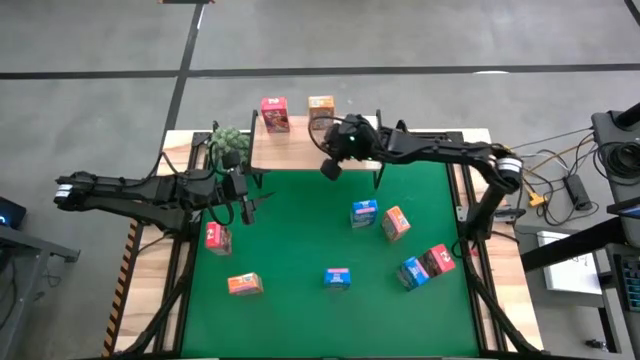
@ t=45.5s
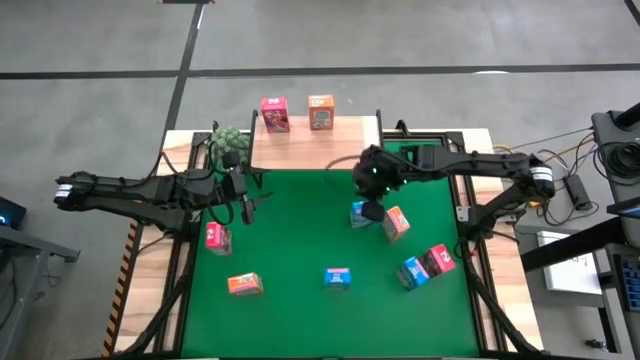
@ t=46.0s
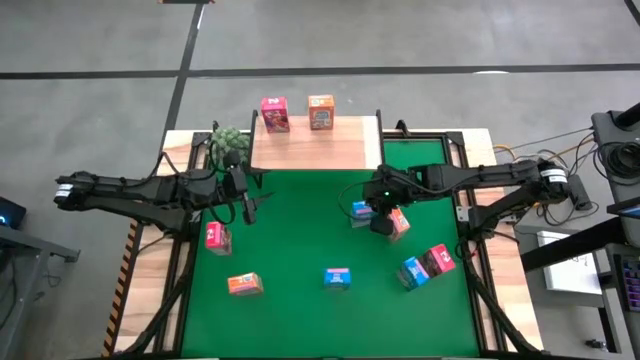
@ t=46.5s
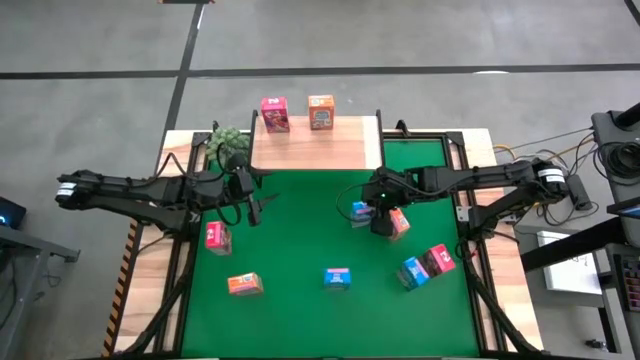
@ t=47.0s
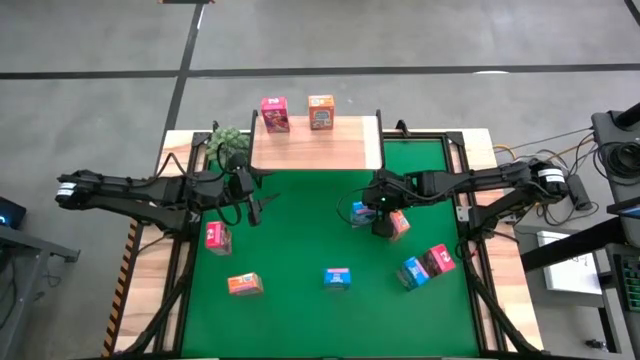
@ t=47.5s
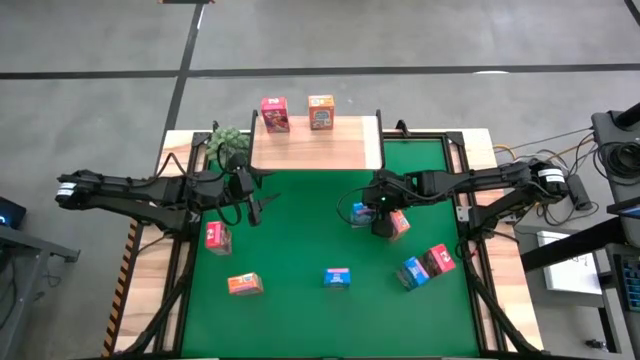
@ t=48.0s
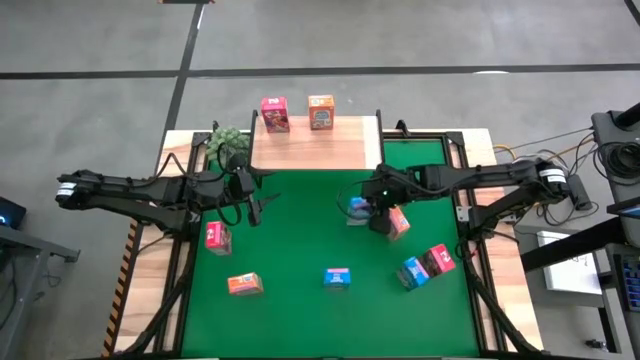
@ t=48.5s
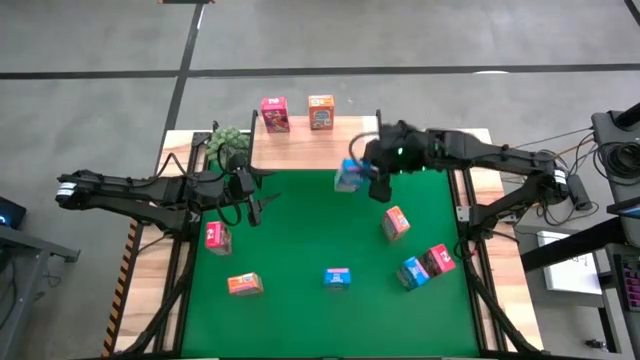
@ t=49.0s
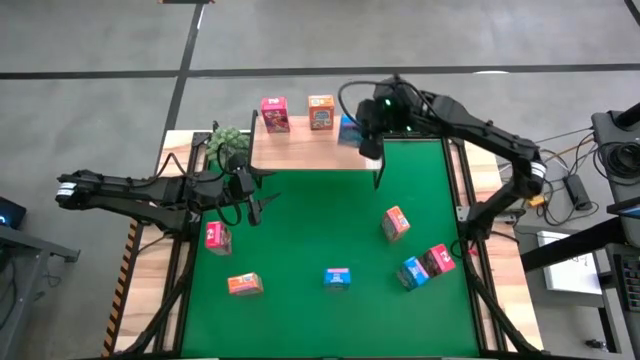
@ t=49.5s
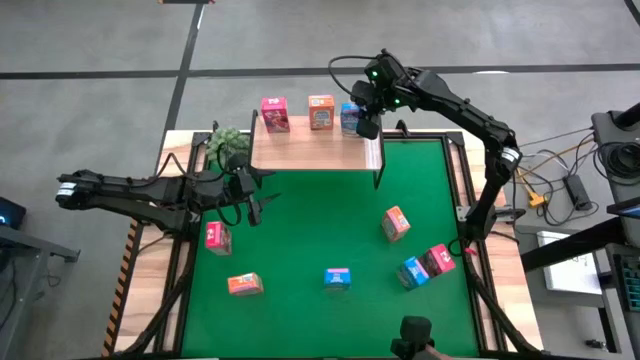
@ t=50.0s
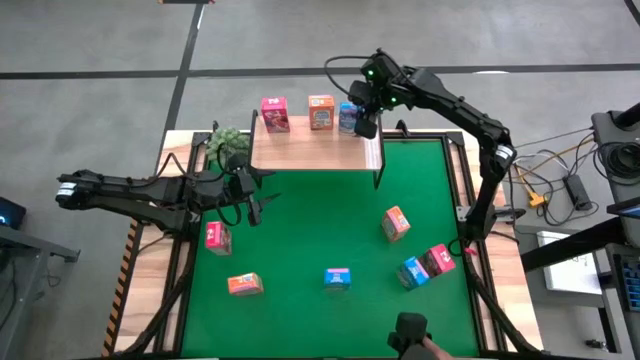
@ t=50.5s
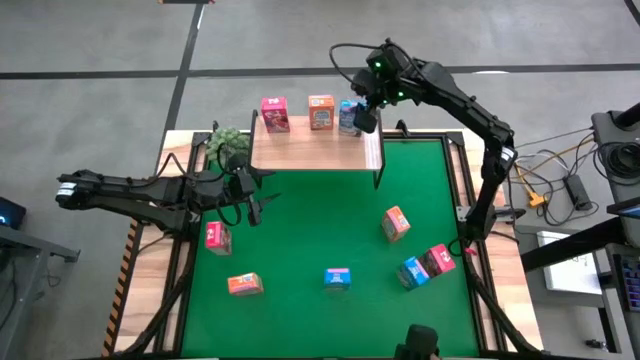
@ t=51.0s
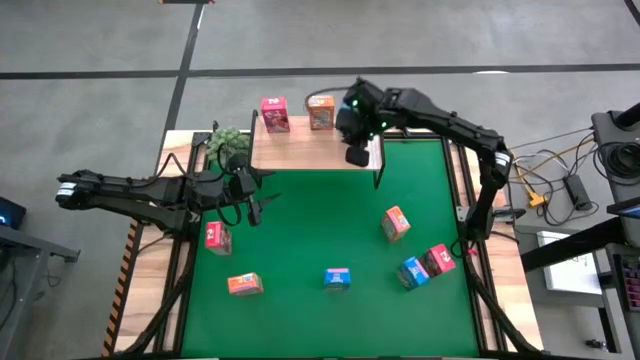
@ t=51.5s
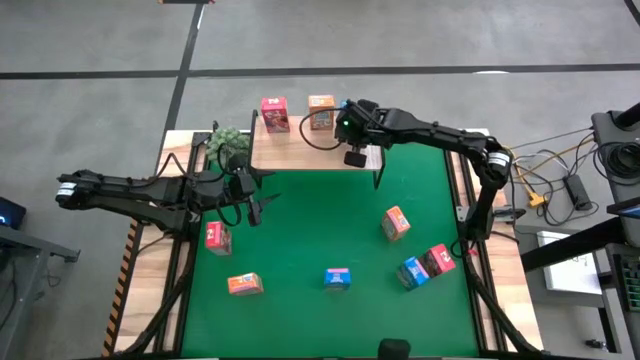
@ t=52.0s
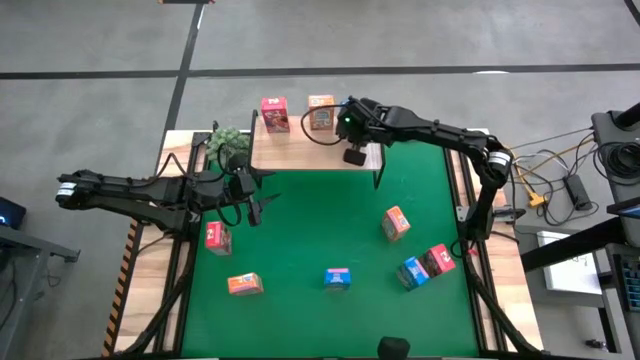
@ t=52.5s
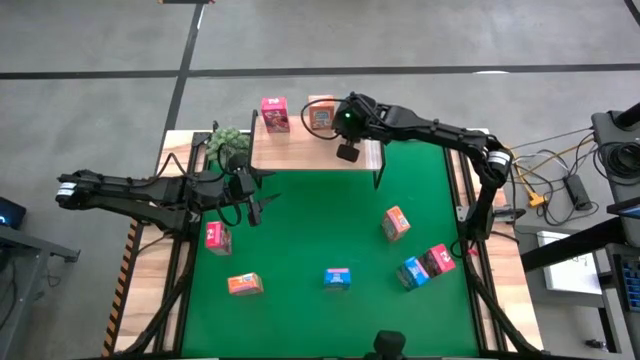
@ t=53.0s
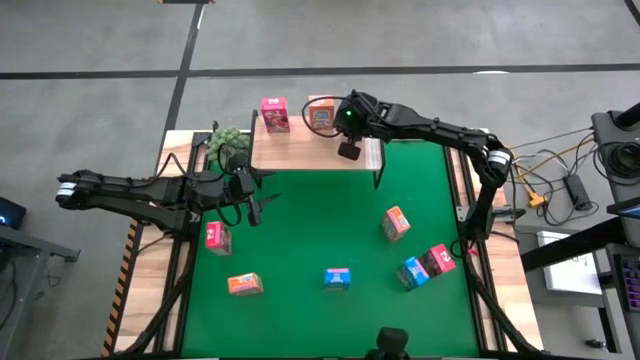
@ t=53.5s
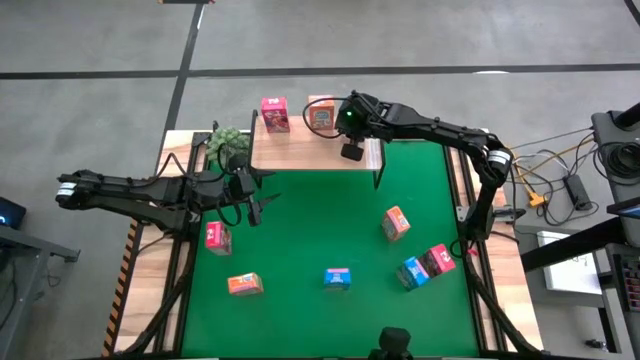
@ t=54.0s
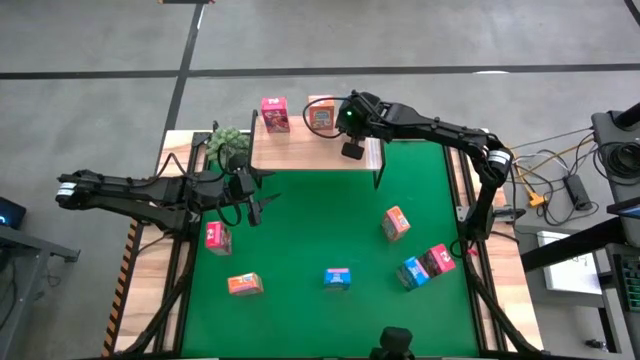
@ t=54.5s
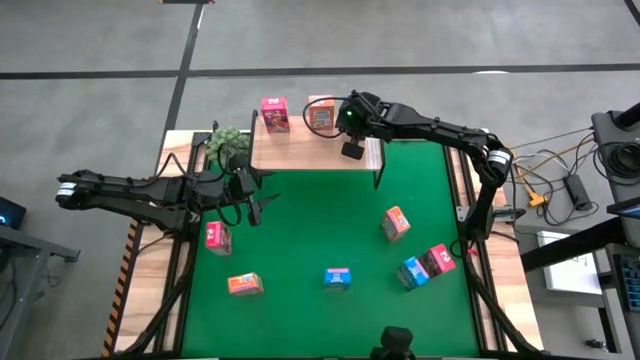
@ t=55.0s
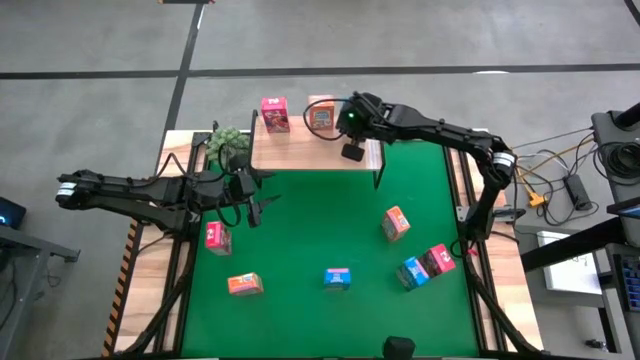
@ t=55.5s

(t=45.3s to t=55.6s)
Task: Stack cereal on shelf
Put the top middle blue cereal box on the shelf

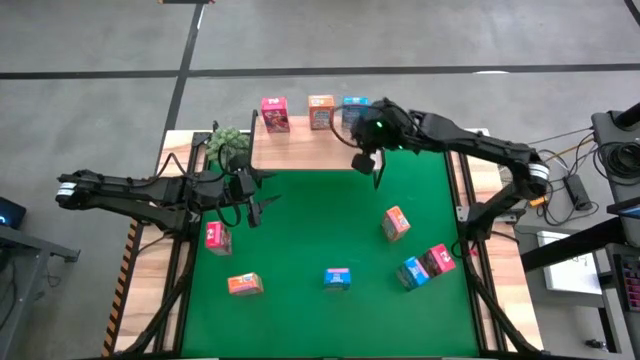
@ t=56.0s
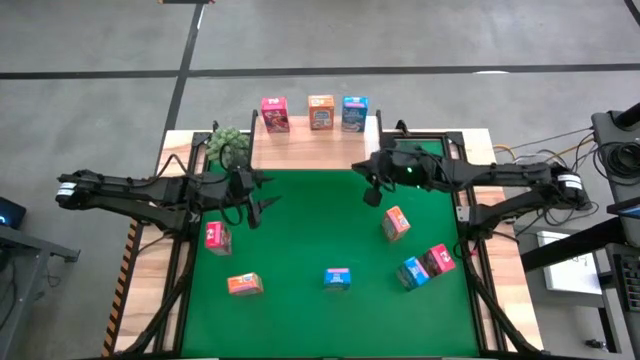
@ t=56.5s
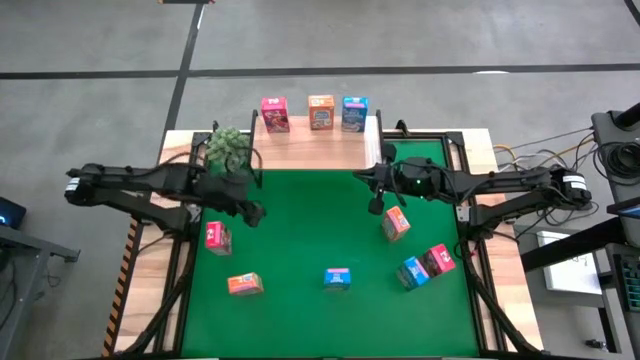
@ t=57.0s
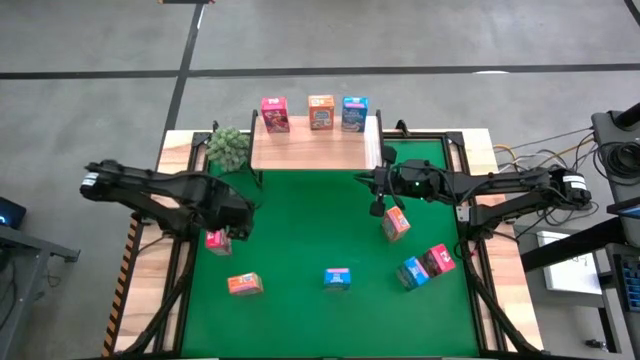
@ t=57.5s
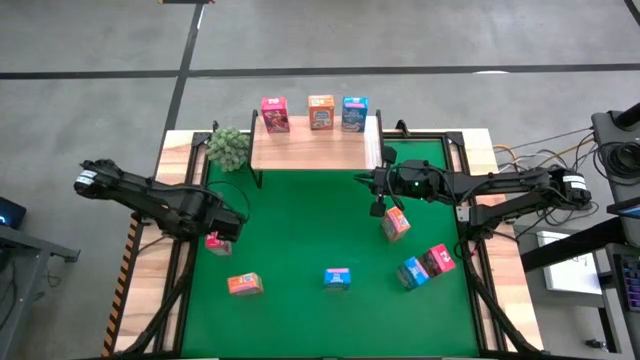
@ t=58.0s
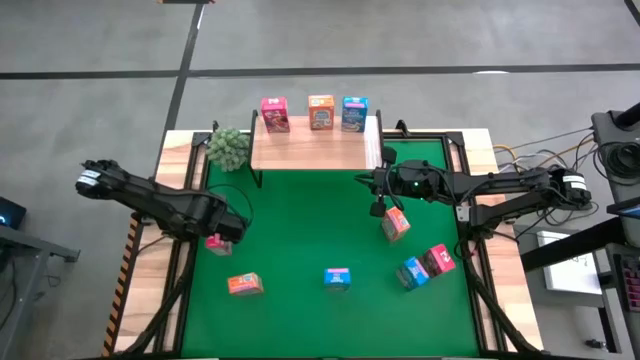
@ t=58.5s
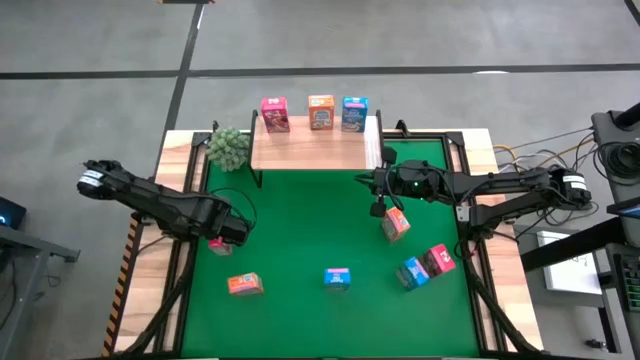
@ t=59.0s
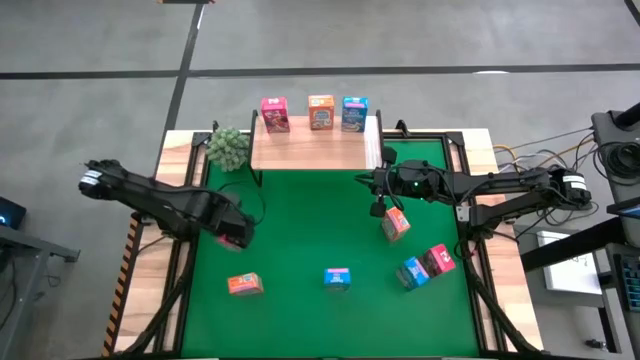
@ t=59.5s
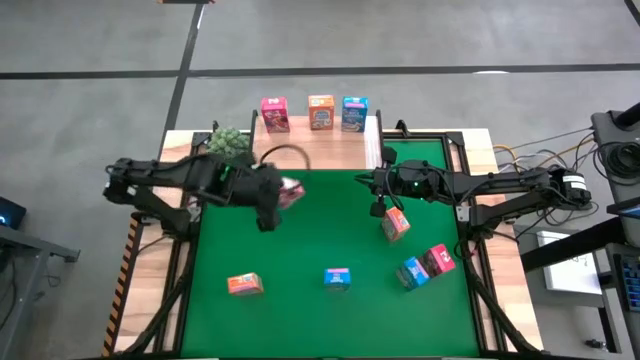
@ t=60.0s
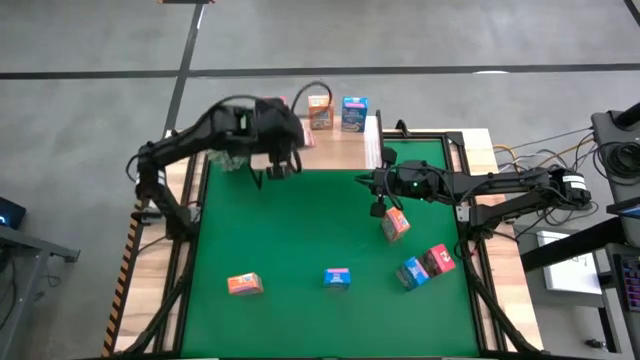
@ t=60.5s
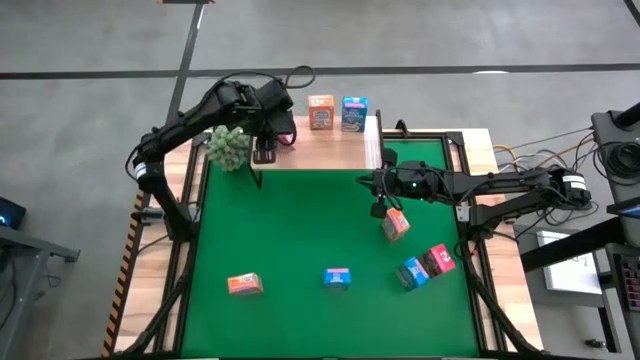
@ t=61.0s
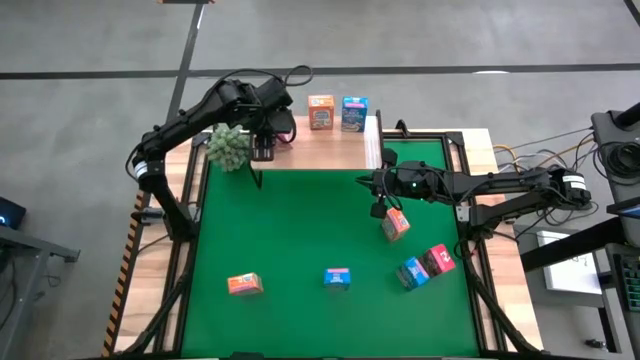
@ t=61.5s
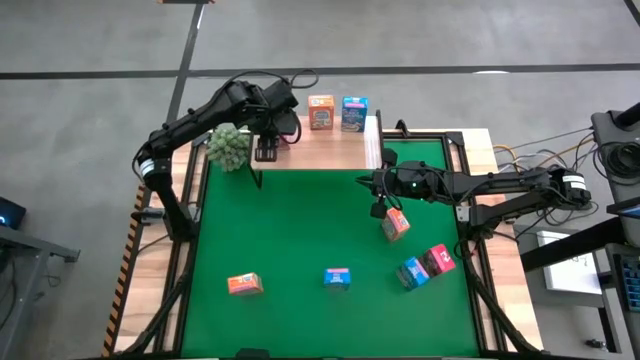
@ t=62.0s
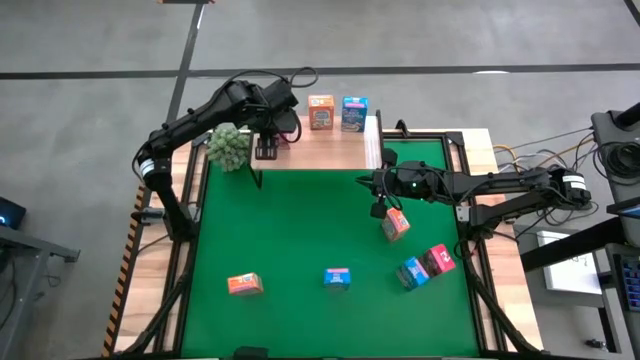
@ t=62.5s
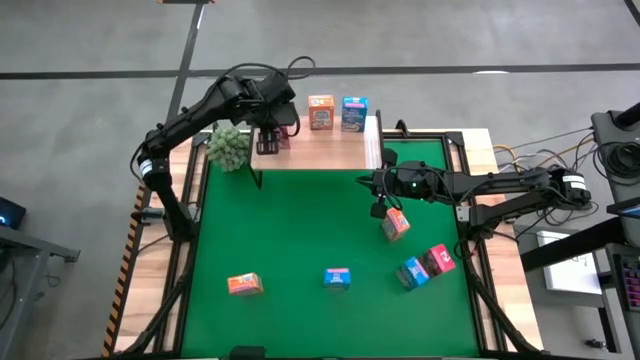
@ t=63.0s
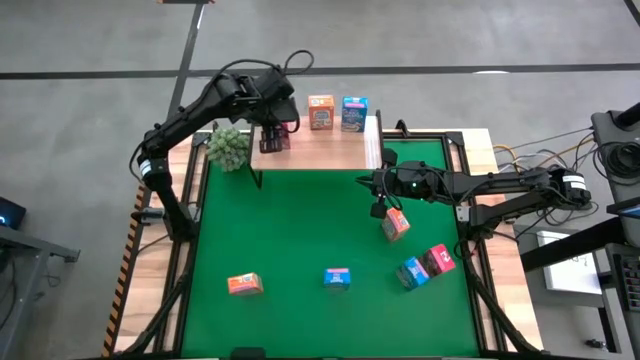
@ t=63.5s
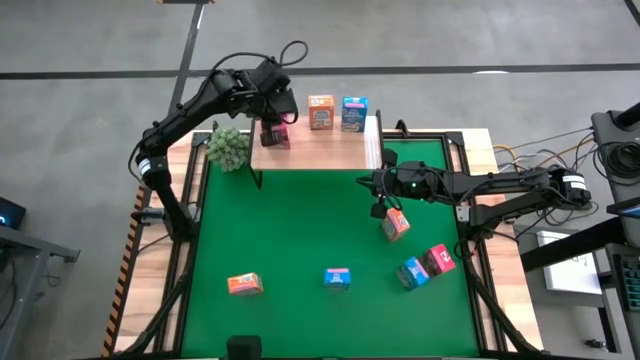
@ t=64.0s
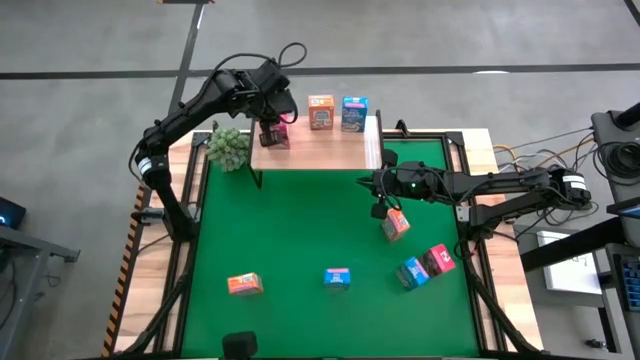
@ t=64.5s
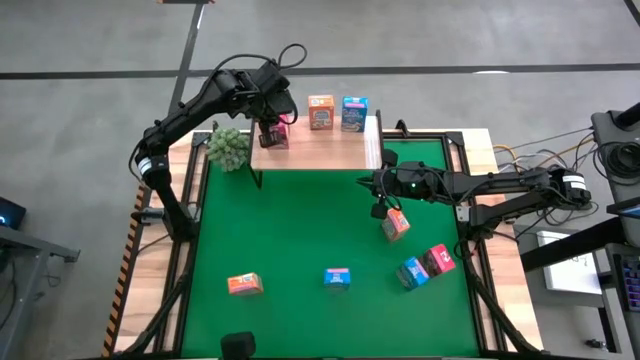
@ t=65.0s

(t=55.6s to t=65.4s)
Put the left red cereal box on the shelf aligned with the other red cereal box

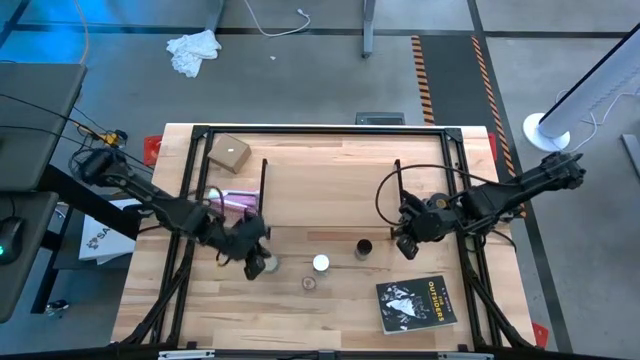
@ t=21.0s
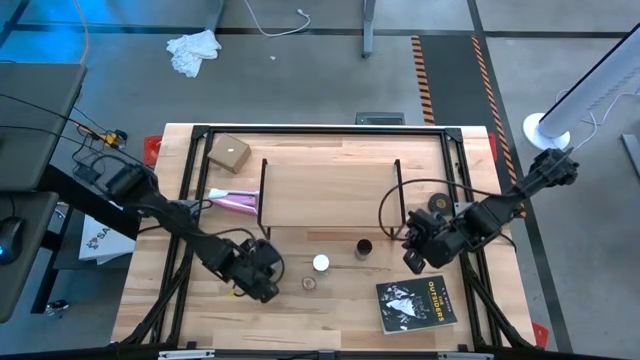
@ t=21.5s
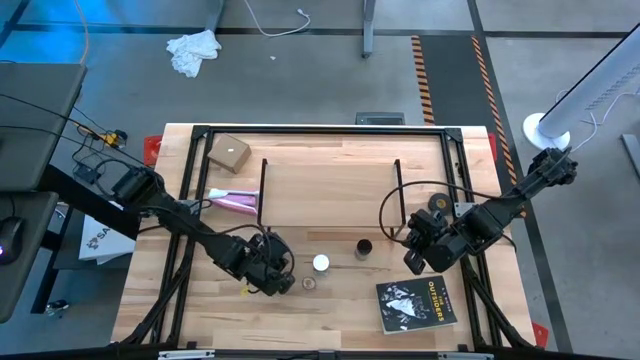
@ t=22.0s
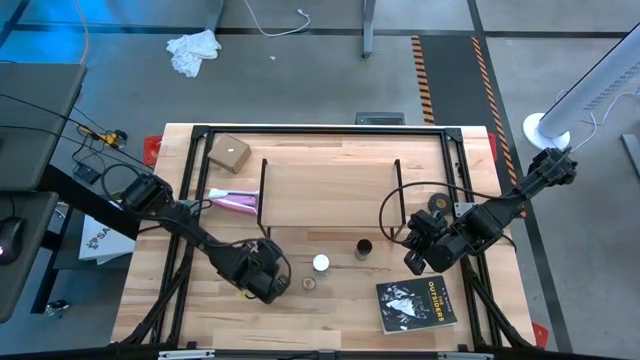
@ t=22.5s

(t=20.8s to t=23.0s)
Task: Shelf spices
Adjust the scented candle on the table
